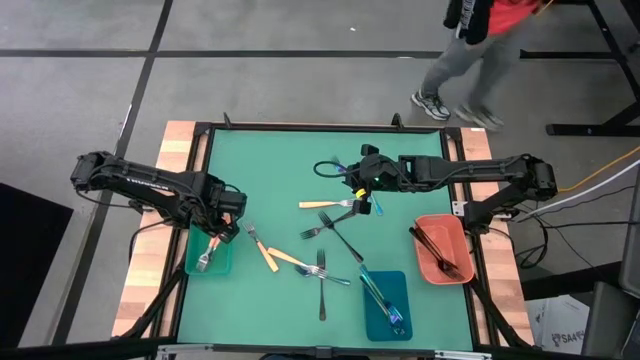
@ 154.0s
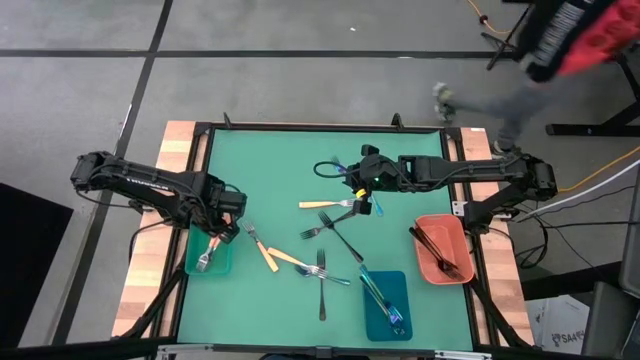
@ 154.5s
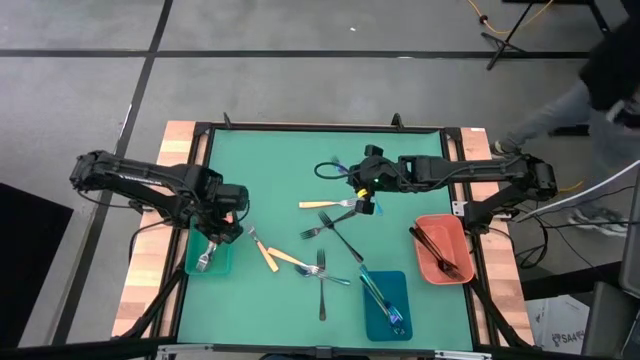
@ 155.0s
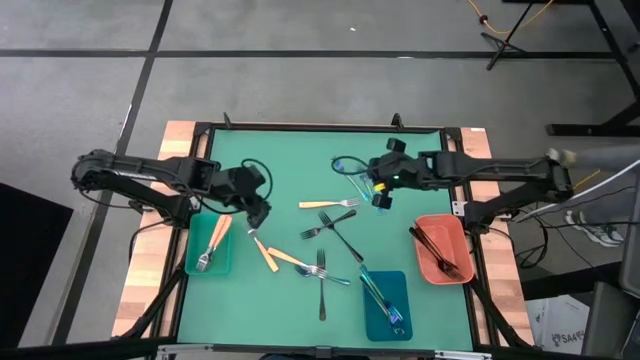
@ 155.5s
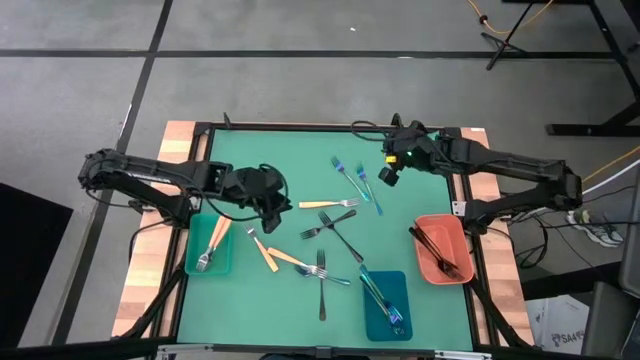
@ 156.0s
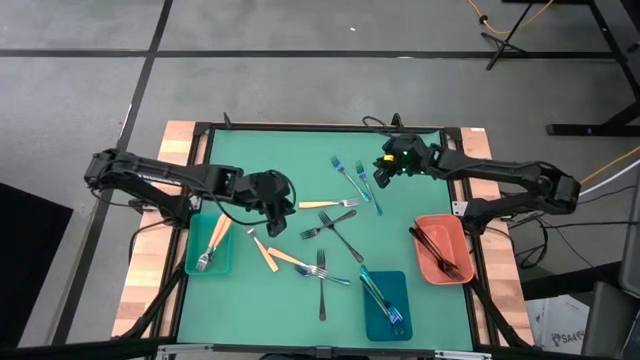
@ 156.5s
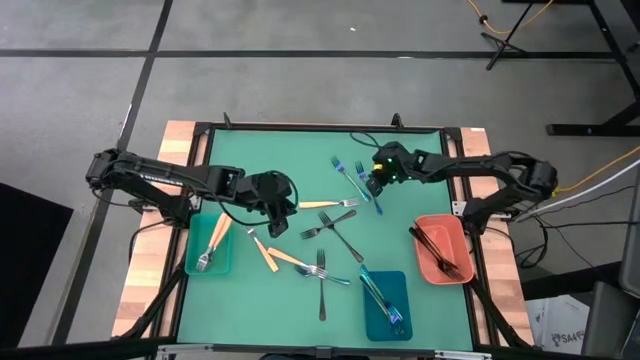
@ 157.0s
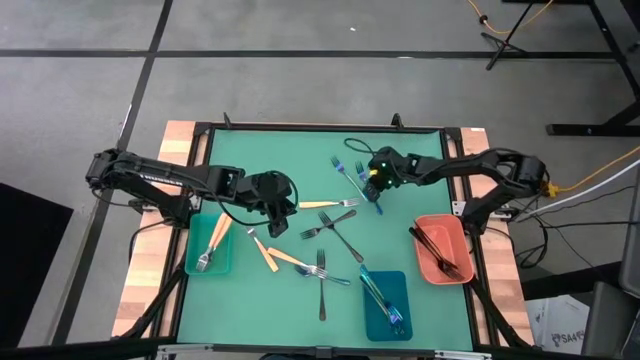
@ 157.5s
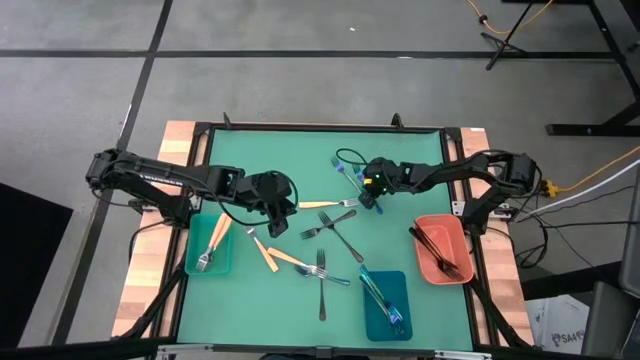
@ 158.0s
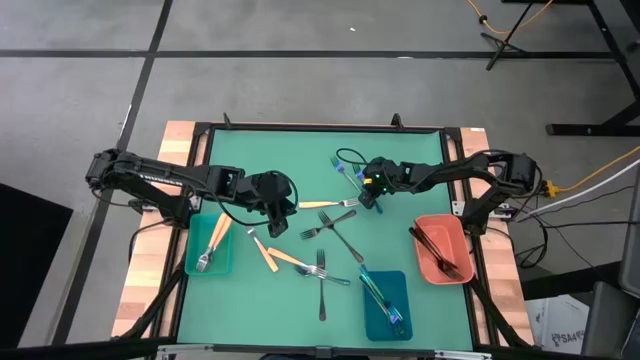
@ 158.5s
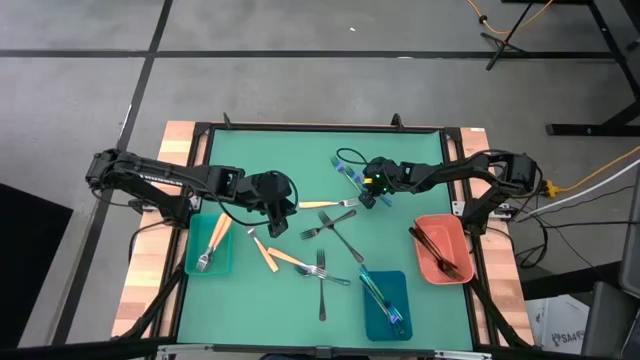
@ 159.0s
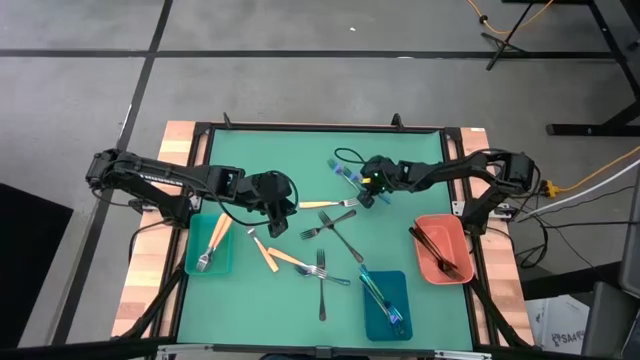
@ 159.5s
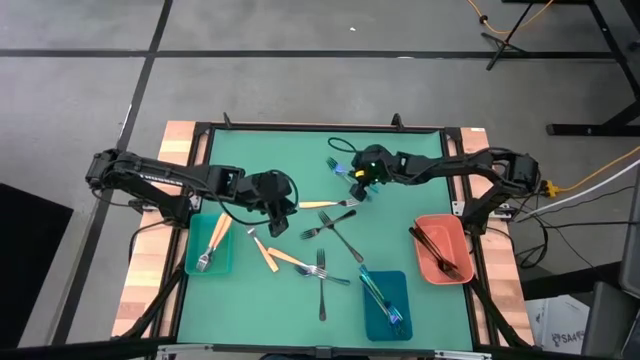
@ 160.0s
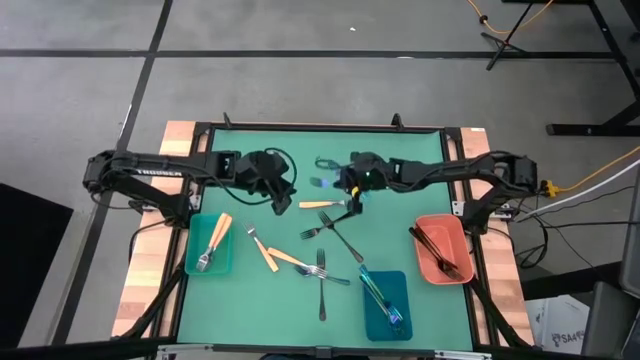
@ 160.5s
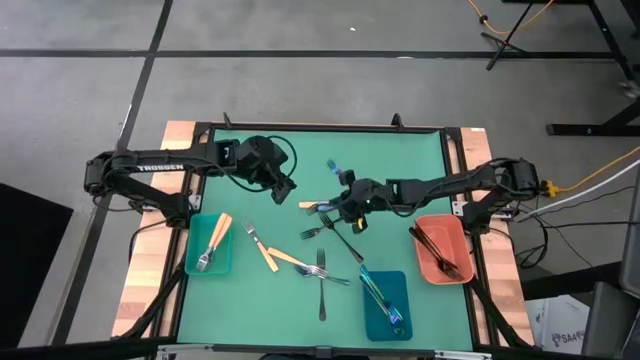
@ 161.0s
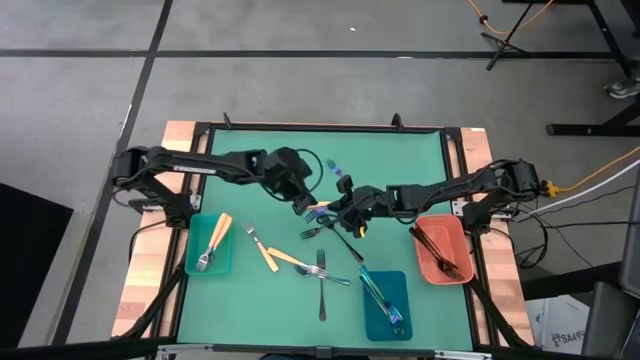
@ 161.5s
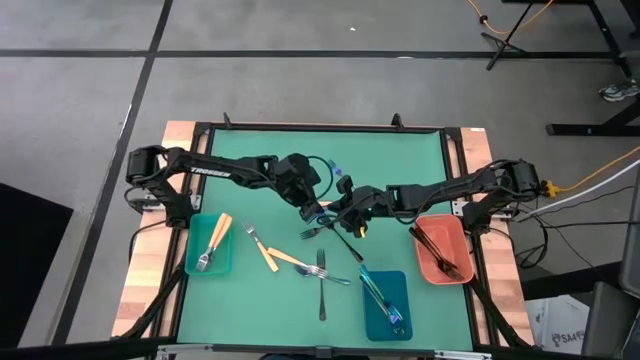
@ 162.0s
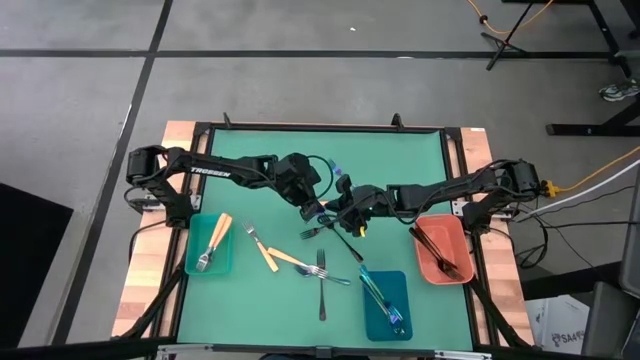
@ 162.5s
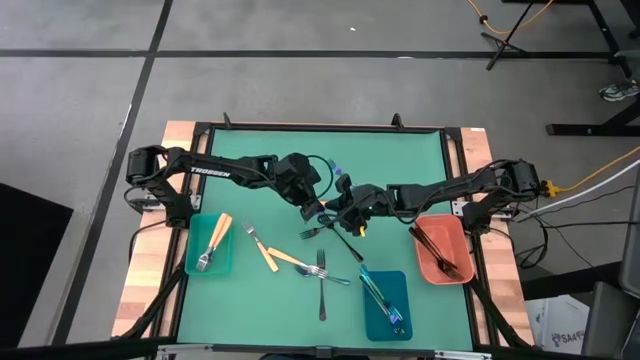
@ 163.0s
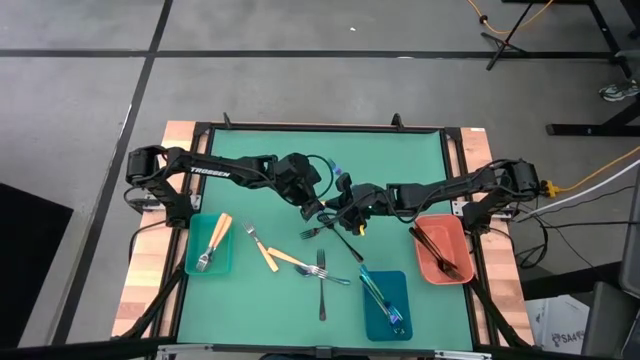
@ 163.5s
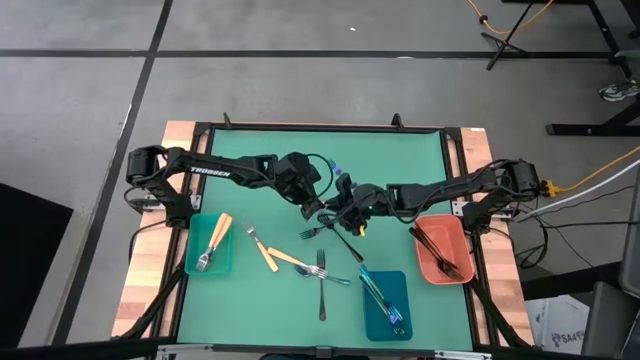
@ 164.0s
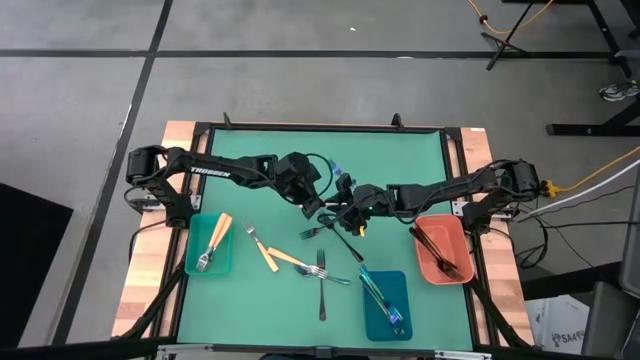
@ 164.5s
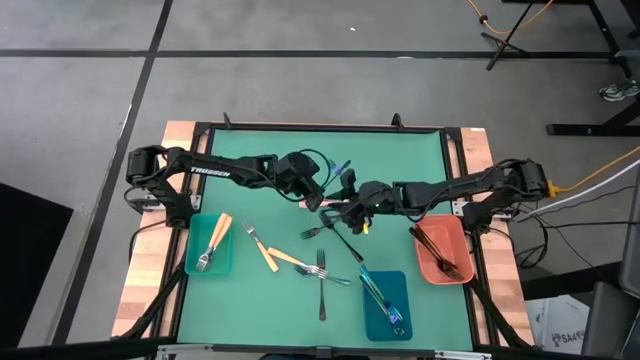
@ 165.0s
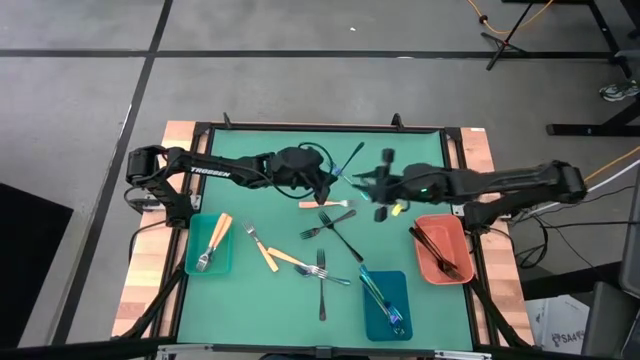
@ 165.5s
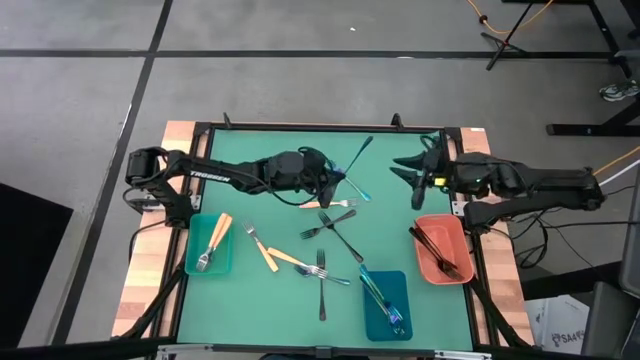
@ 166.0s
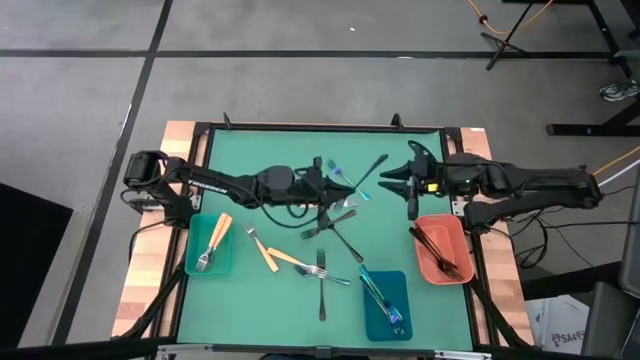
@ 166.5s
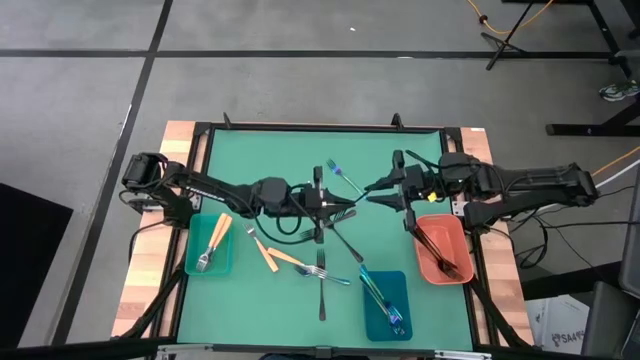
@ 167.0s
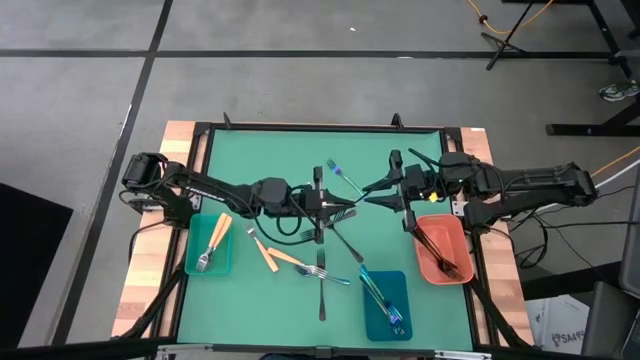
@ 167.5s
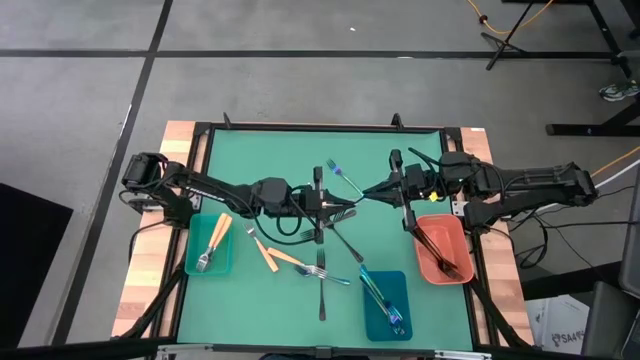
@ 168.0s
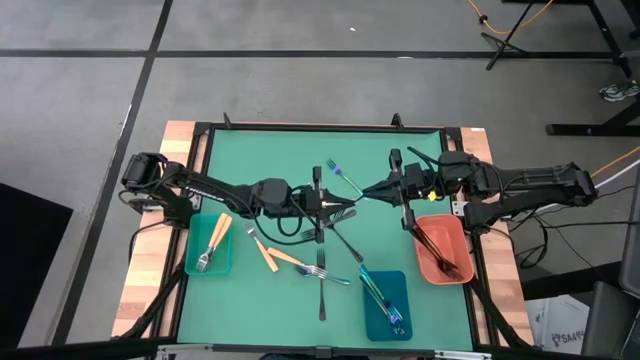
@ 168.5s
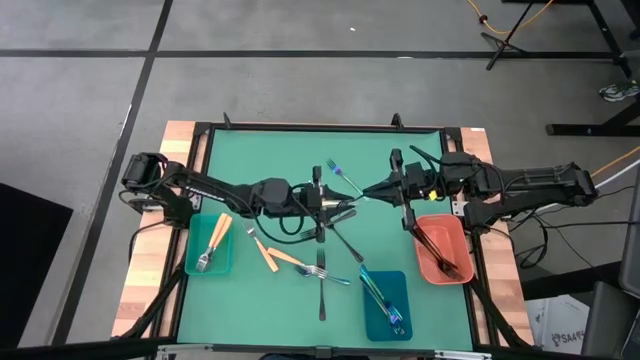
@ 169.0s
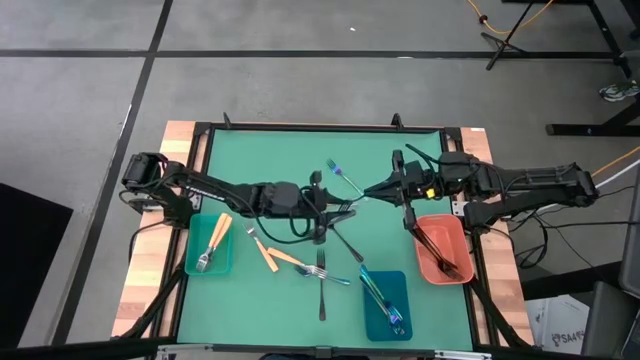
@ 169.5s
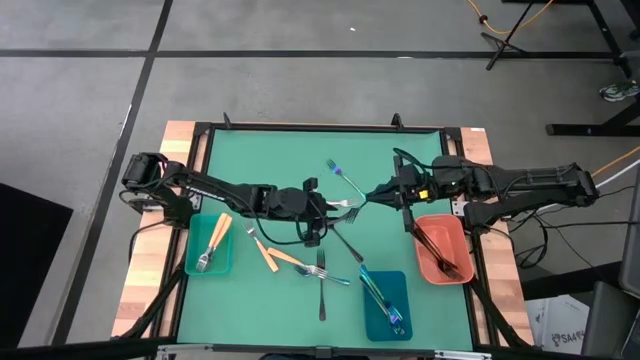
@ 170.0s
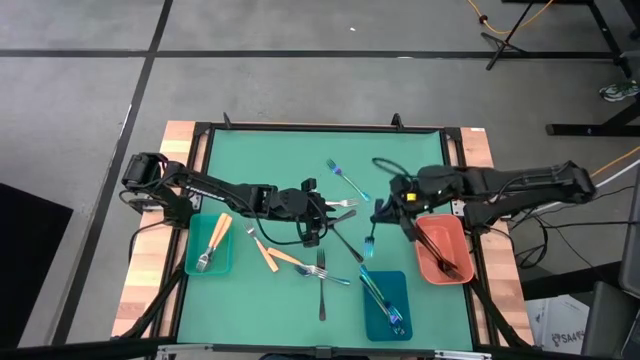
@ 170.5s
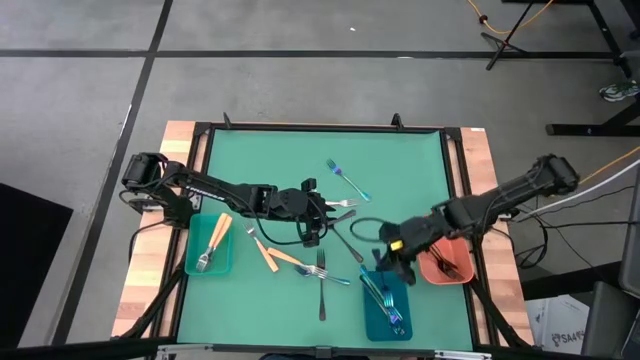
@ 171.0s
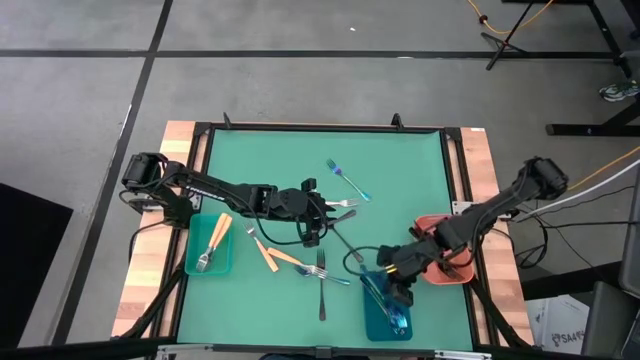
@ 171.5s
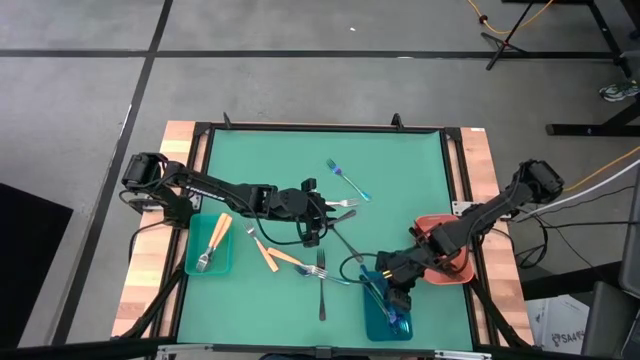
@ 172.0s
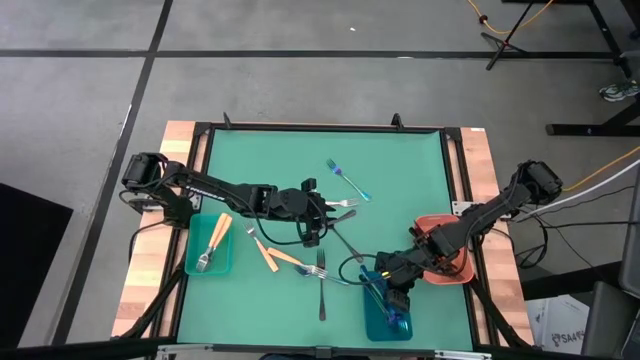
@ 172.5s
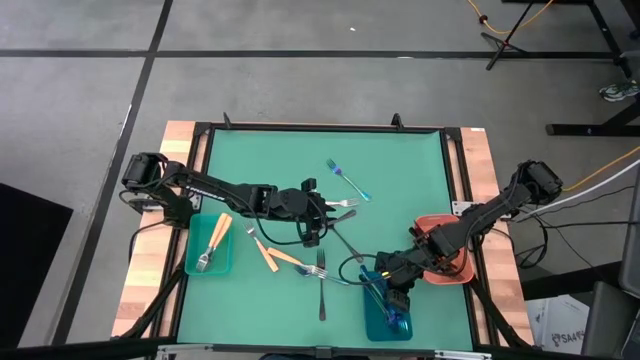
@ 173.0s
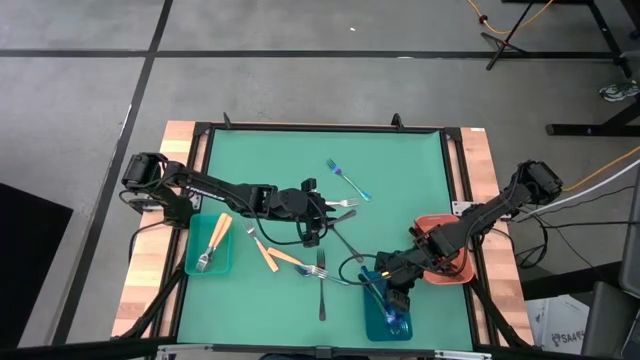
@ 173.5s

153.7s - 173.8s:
Task: Sort silverware by color (type)
Put the blue fork into the blue bin
